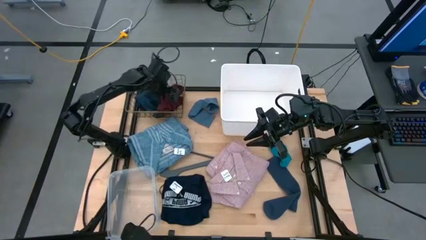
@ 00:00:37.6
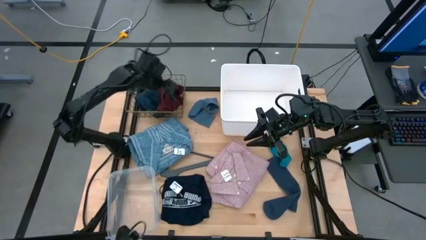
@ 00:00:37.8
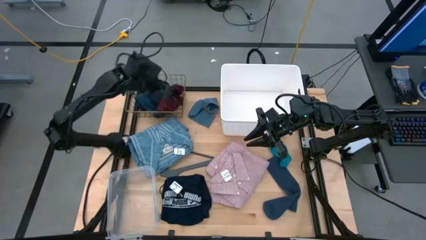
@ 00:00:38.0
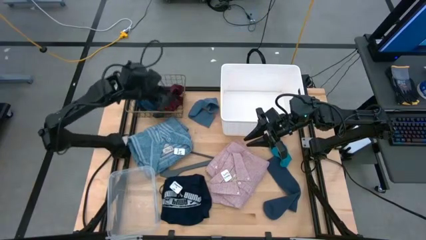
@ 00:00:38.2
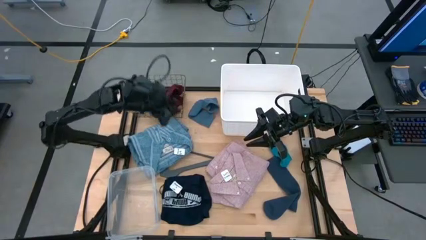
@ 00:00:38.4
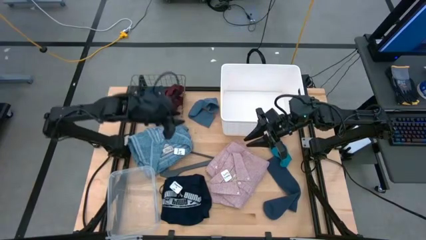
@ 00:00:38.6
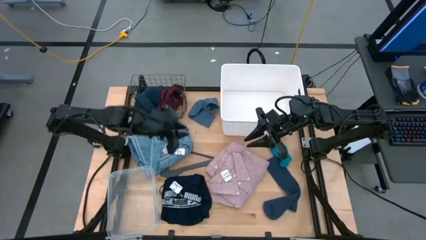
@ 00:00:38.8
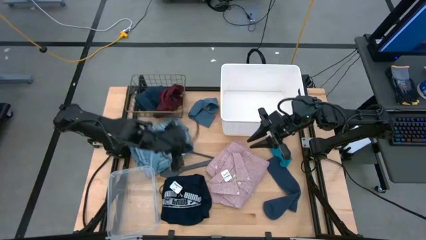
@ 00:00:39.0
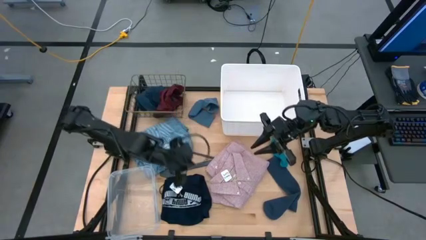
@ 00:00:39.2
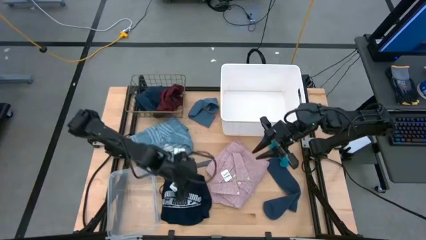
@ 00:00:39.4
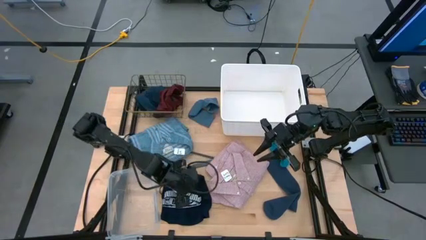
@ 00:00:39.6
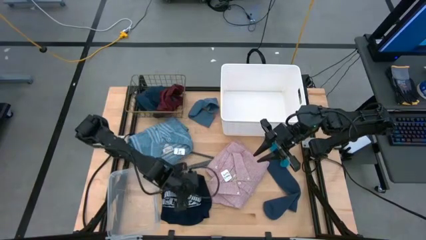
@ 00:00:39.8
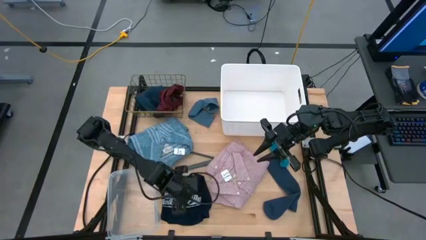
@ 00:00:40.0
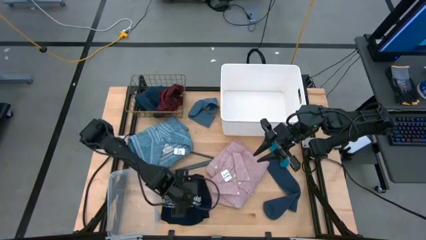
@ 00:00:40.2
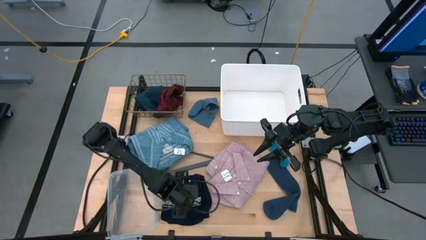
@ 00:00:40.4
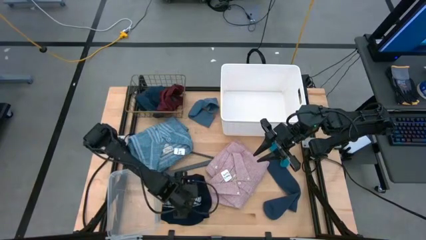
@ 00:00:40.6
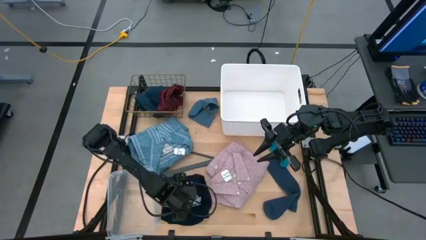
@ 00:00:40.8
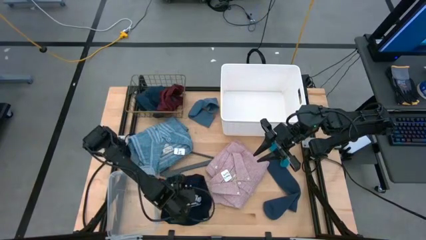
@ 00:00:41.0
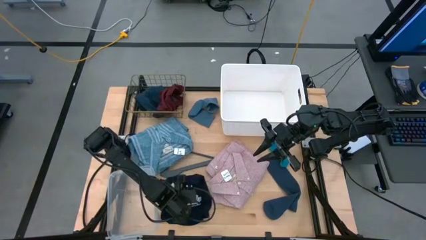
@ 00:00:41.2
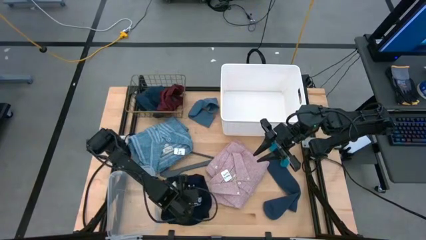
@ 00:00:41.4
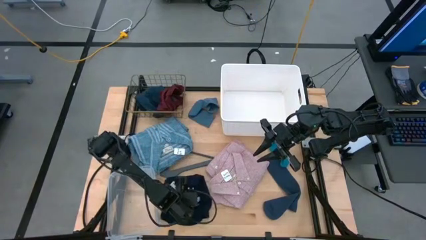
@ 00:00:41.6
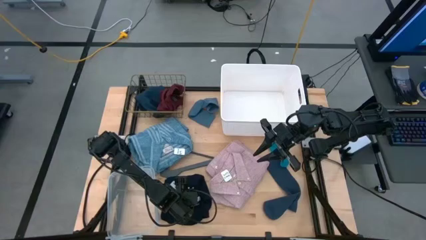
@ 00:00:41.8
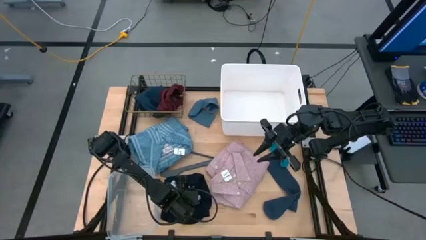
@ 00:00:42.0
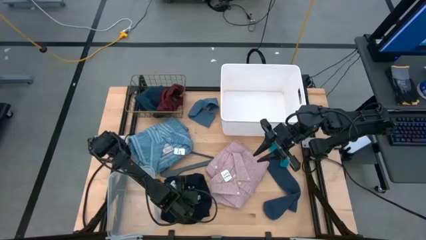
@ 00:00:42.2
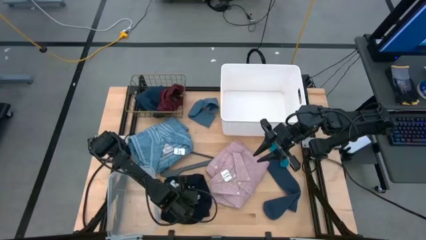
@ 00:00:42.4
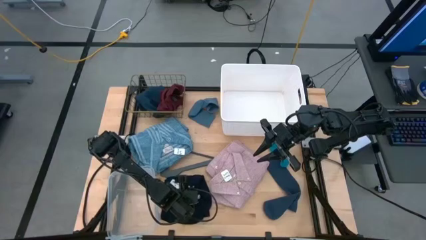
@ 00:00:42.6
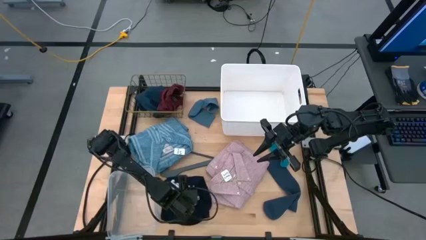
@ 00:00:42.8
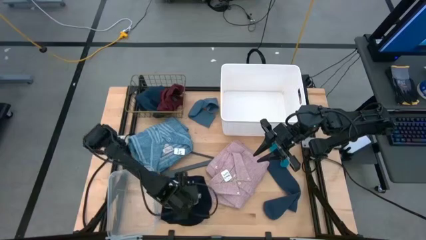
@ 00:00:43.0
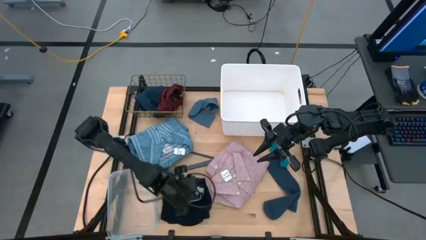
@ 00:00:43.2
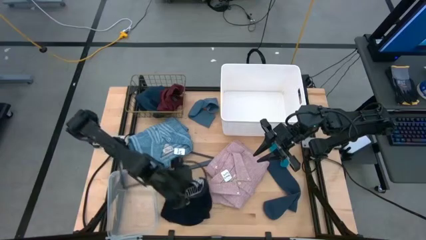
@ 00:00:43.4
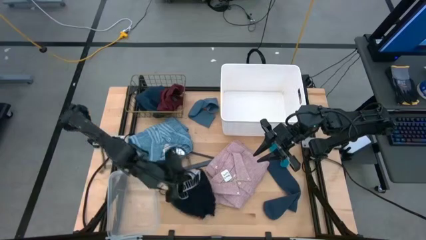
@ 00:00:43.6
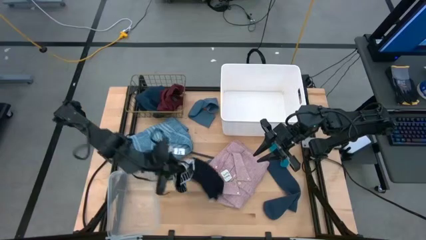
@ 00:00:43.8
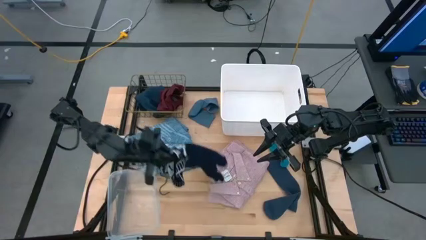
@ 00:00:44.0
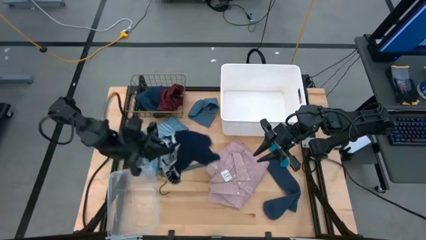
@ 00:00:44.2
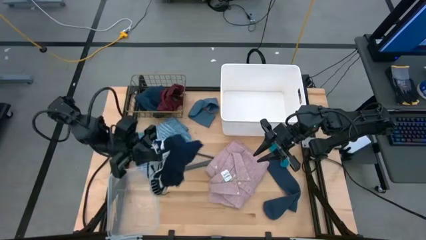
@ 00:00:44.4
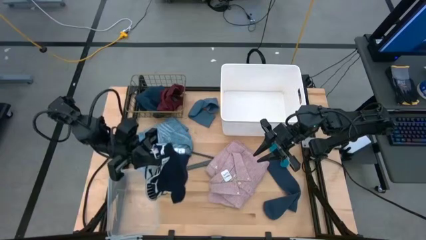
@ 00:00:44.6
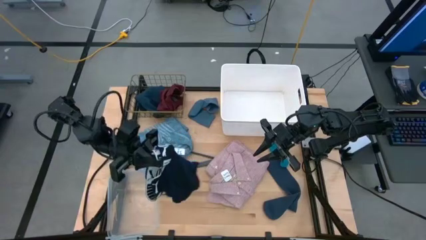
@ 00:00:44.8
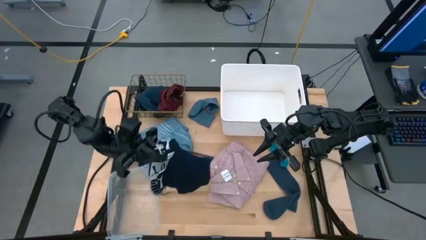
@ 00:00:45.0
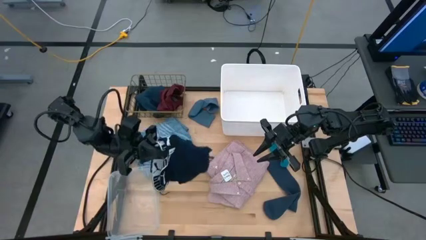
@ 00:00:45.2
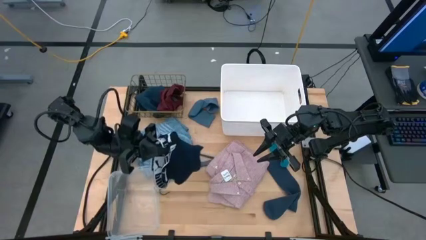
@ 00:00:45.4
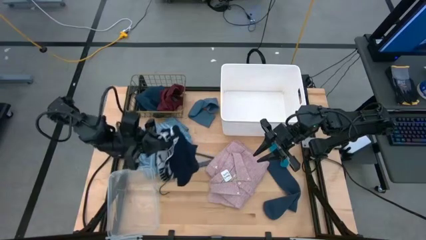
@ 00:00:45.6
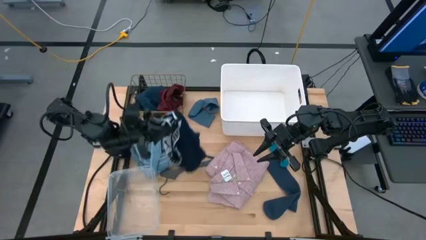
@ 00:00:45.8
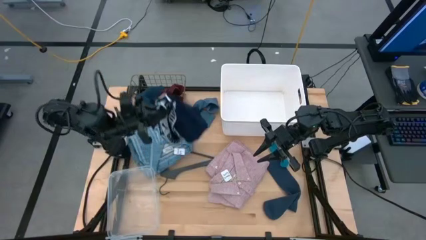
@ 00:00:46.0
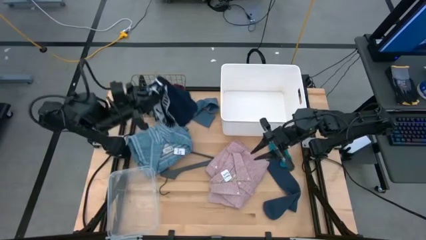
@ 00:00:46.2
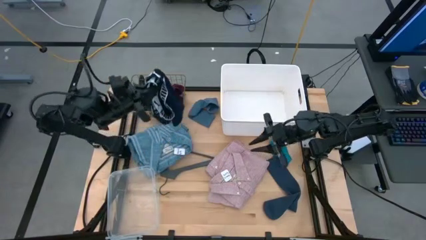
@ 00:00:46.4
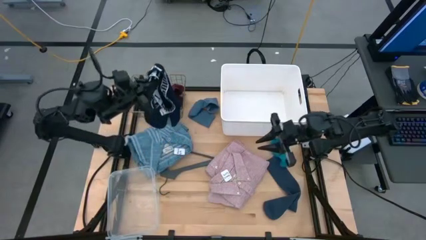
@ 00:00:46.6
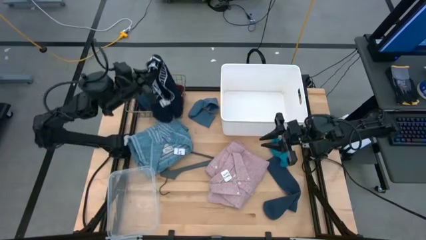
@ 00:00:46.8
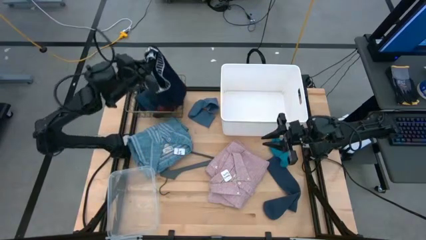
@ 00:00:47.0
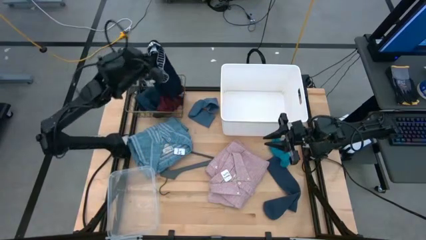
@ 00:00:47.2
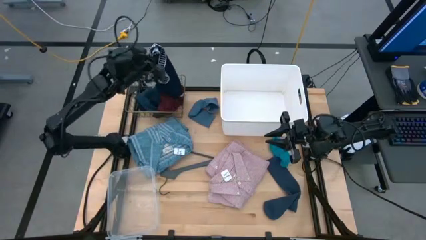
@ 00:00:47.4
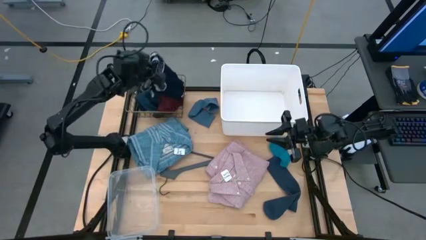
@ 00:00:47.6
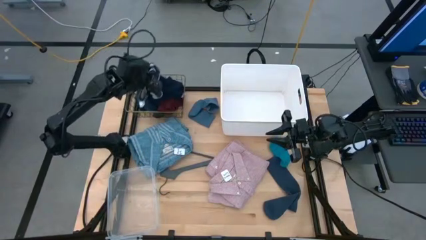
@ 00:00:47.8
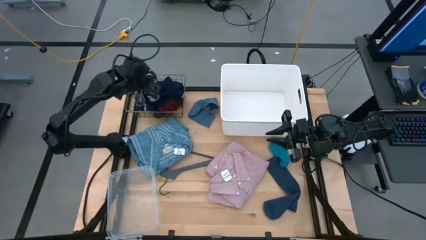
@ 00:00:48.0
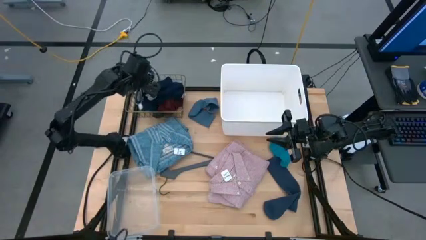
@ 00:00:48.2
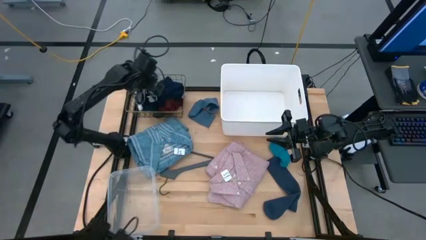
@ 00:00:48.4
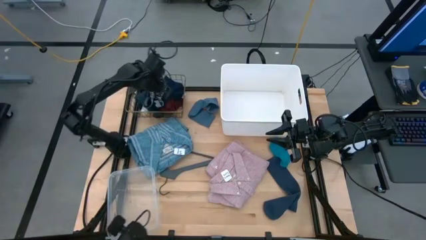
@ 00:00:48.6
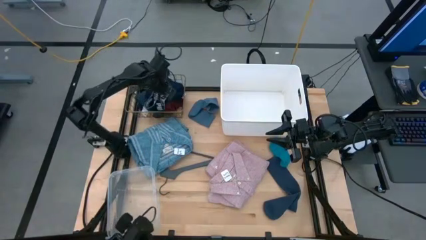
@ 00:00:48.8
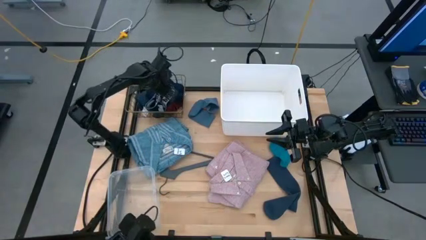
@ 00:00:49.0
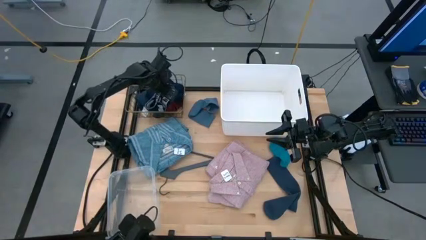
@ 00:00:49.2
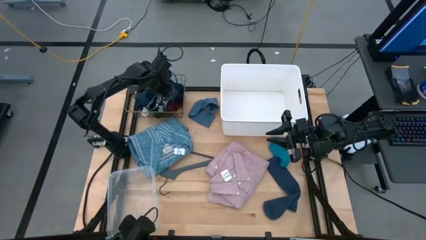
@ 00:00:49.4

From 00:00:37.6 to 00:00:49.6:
Task: Pick & Place Cloths
Put the dark blue boxers into the black basket
